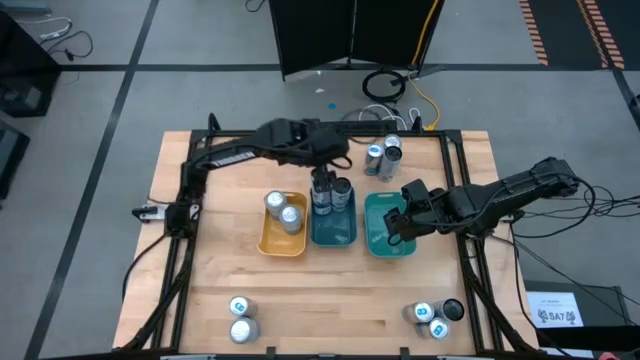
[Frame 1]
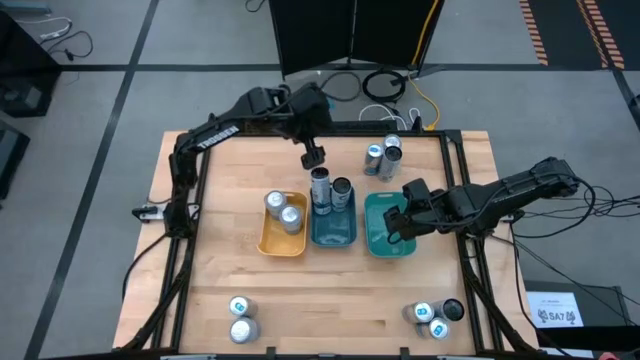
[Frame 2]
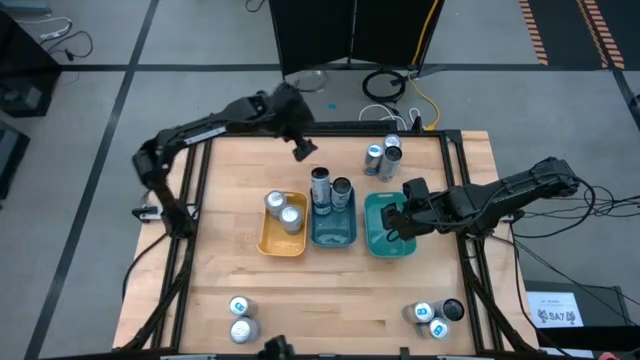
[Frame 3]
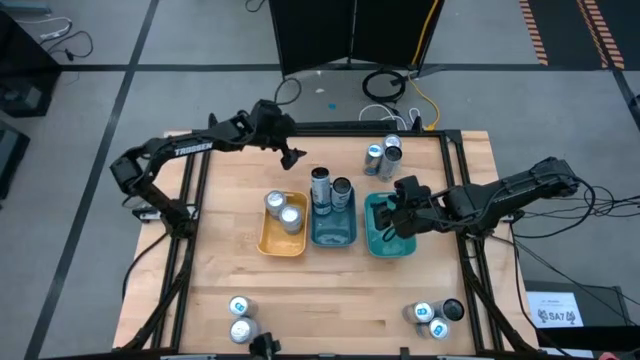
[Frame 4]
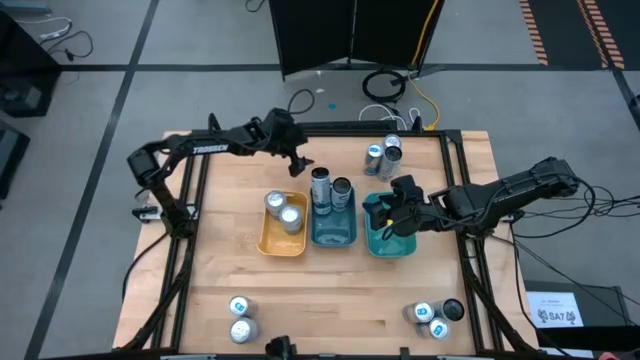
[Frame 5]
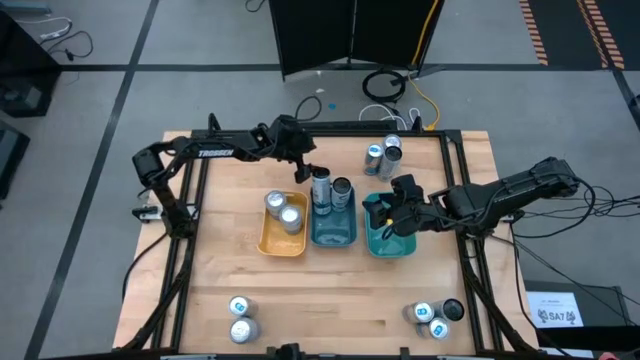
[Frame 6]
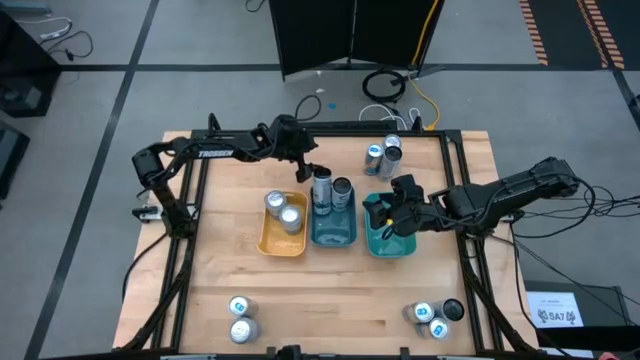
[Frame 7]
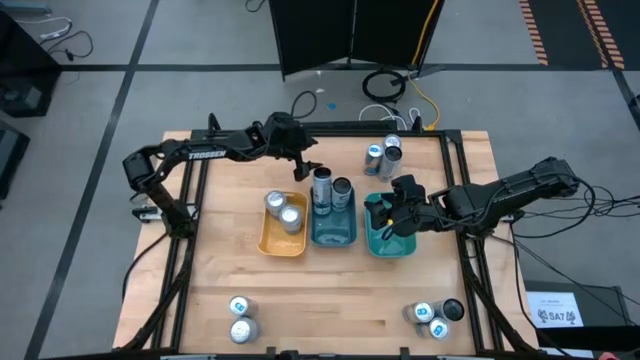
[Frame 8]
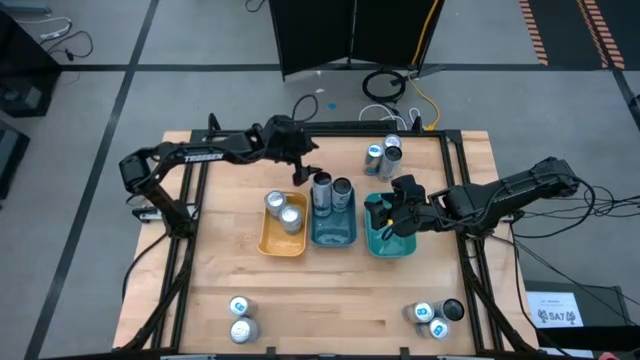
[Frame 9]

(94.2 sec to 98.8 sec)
Task: Sort soda cans
Adjust the white-blue soda can in the blue bin

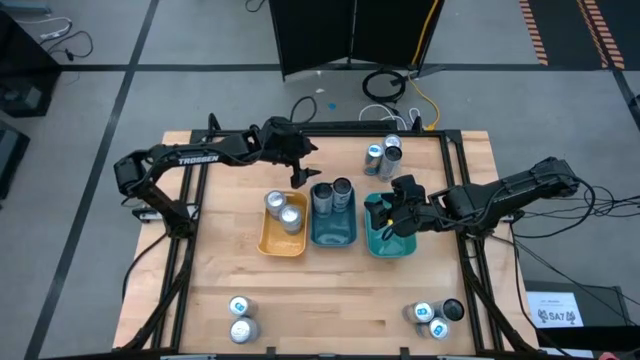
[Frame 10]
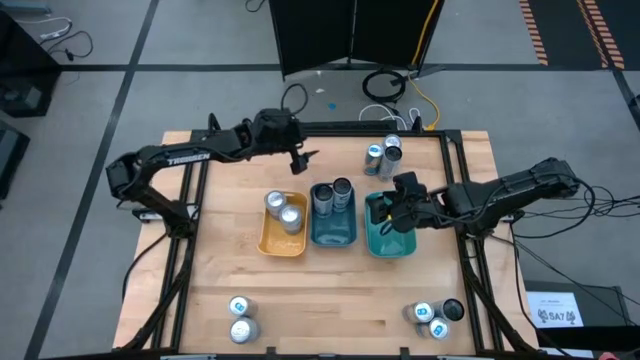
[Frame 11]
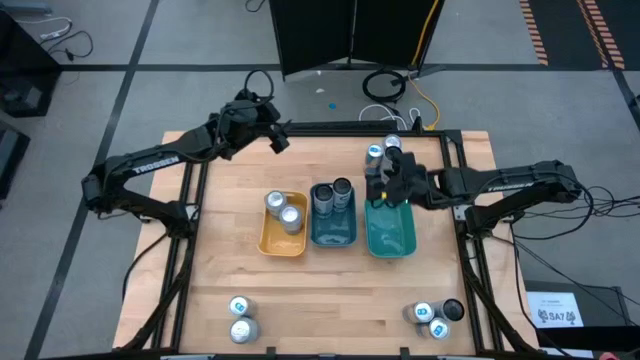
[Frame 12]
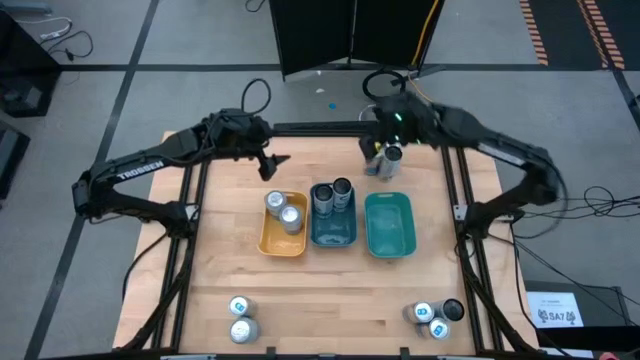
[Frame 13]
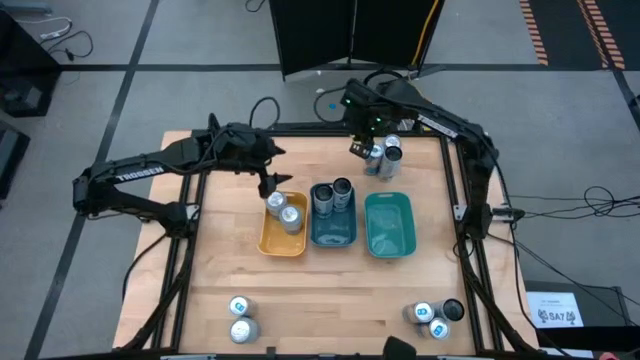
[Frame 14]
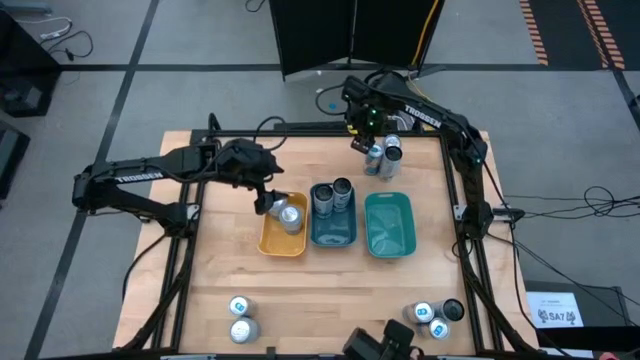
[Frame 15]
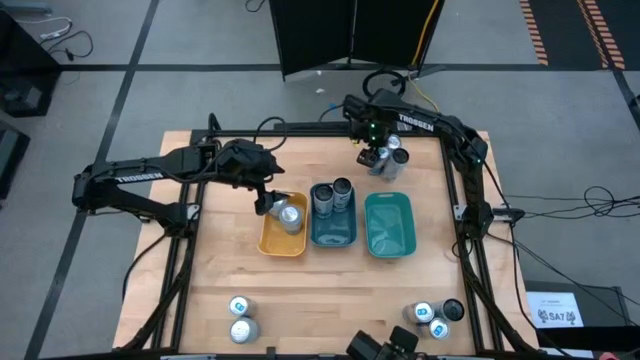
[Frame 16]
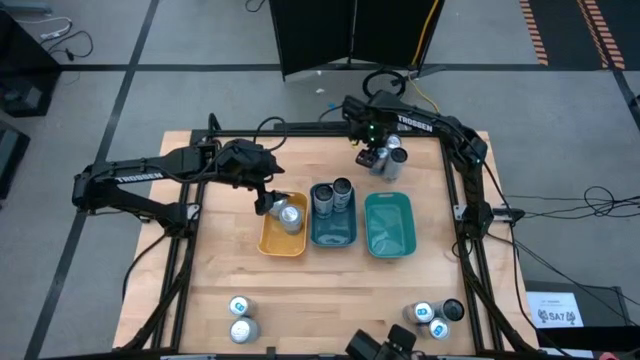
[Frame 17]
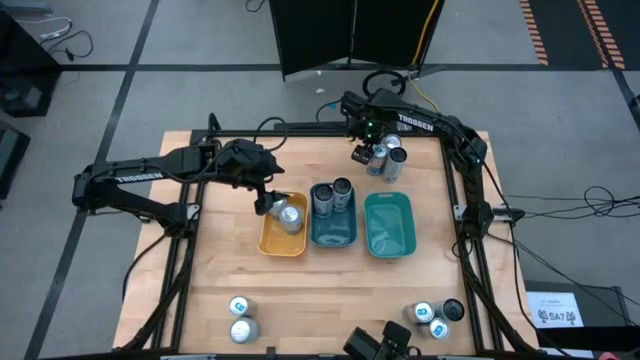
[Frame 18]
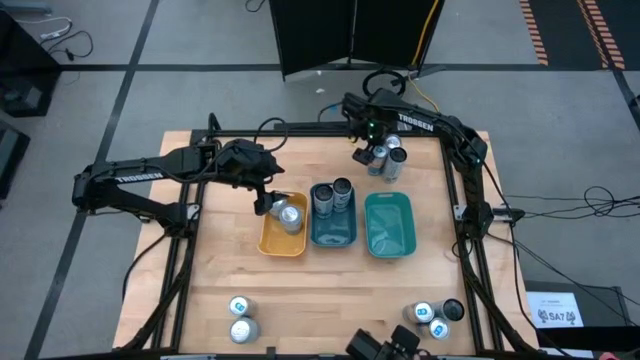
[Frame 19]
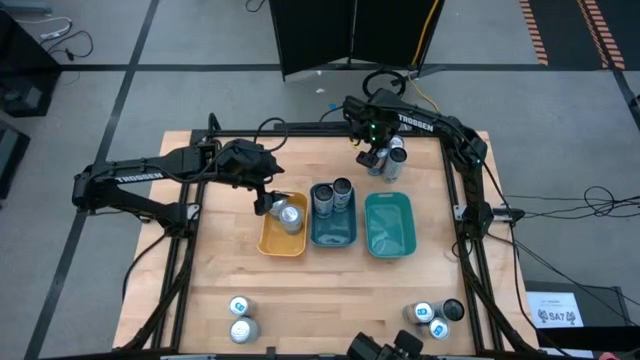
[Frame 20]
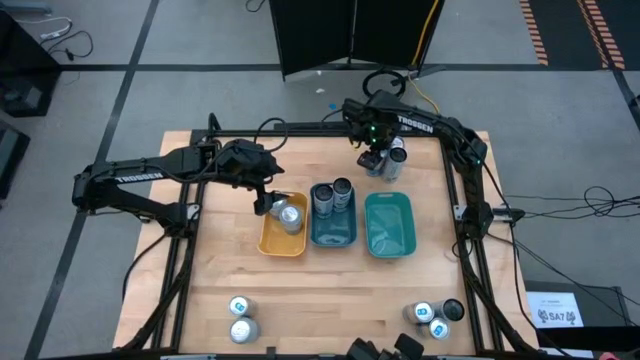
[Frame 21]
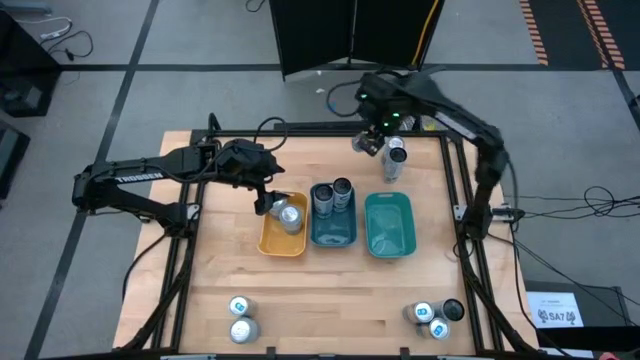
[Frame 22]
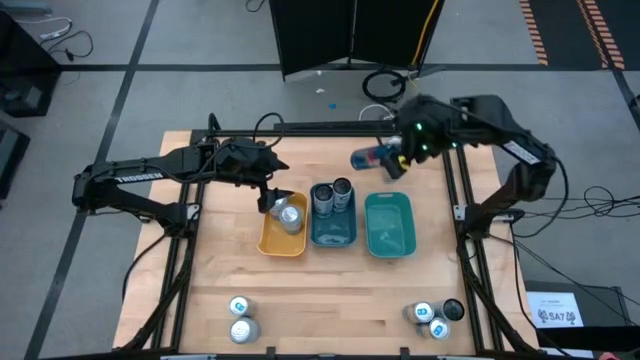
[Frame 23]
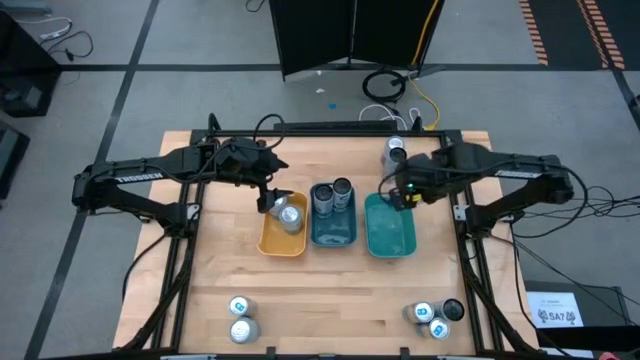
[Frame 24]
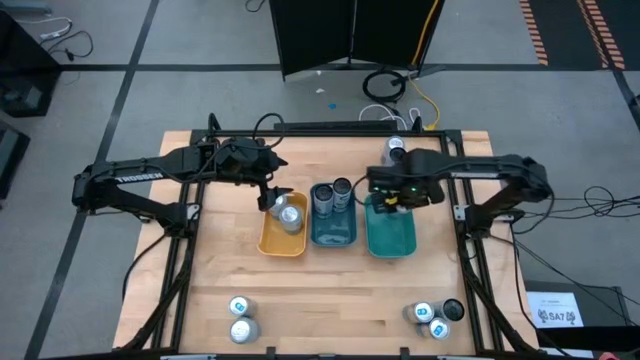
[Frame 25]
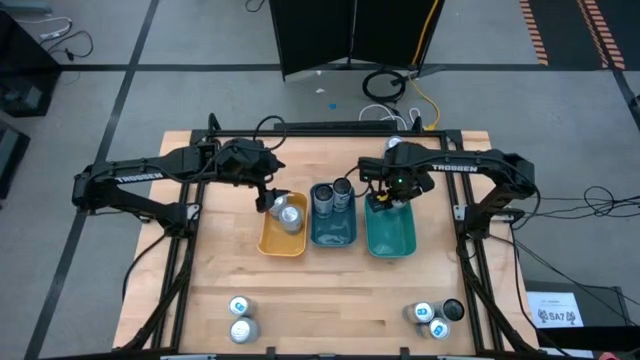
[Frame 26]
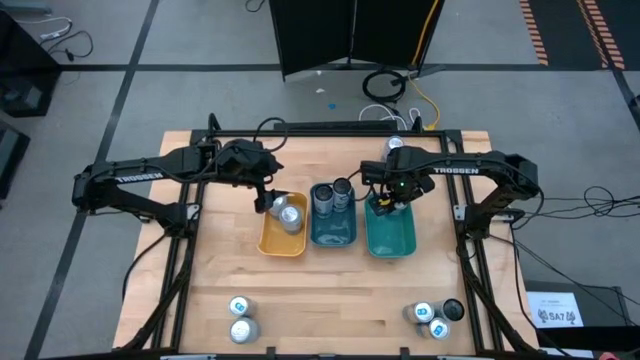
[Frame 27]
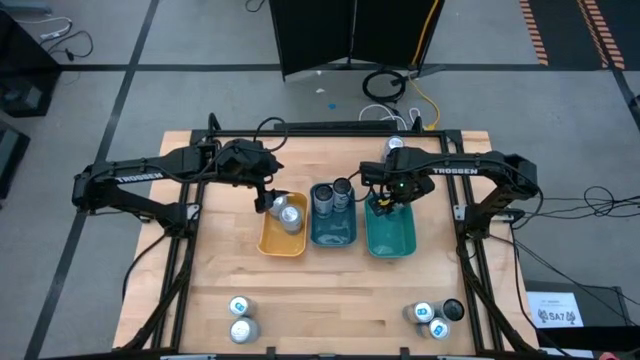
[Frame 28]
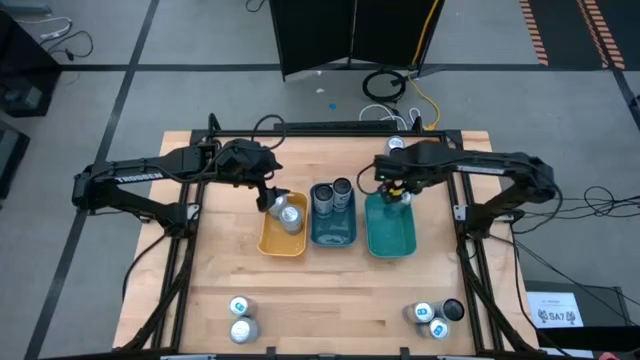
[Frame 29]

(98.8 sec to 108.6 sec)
Put the blue soda can into the green bin

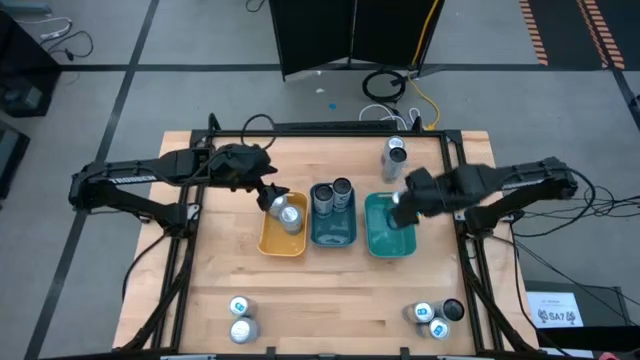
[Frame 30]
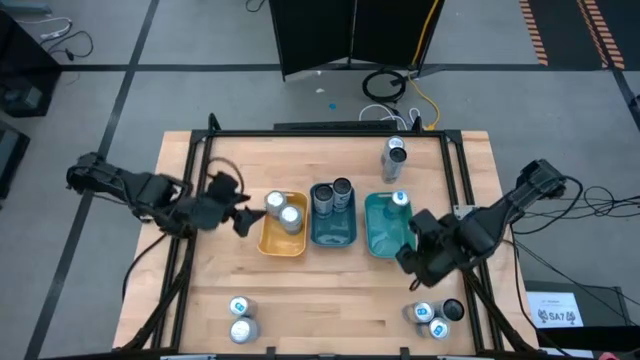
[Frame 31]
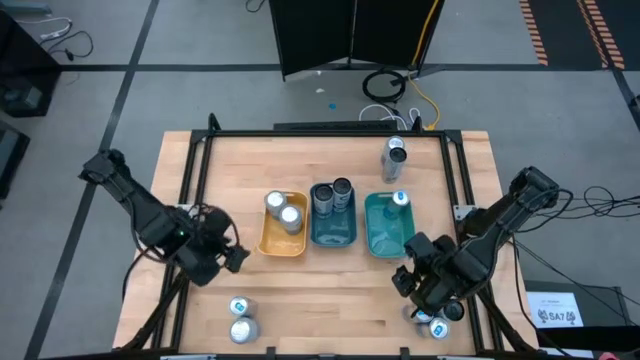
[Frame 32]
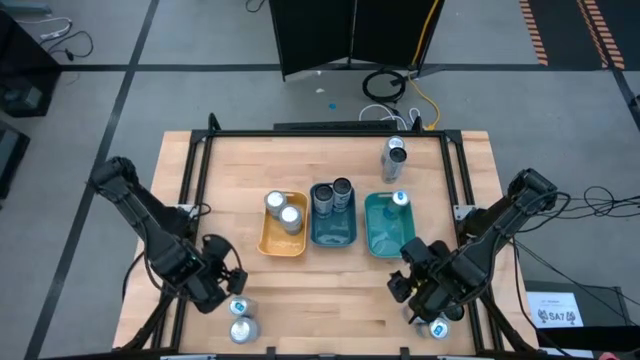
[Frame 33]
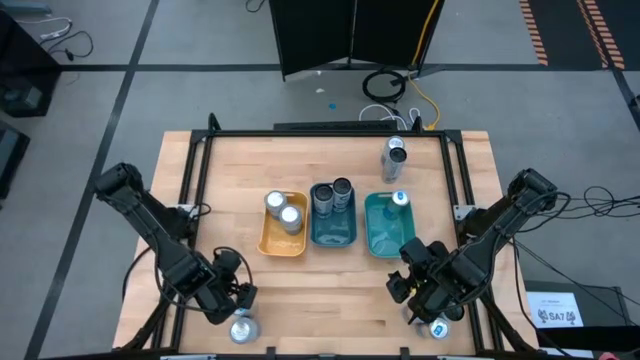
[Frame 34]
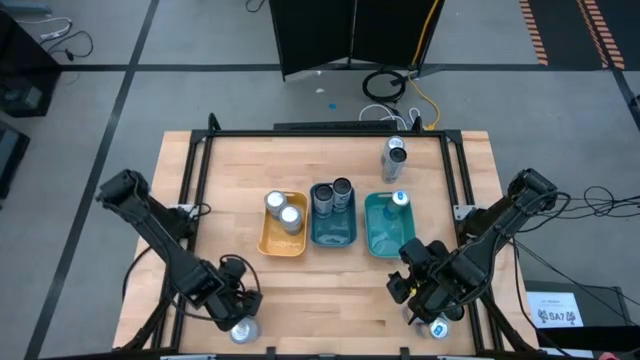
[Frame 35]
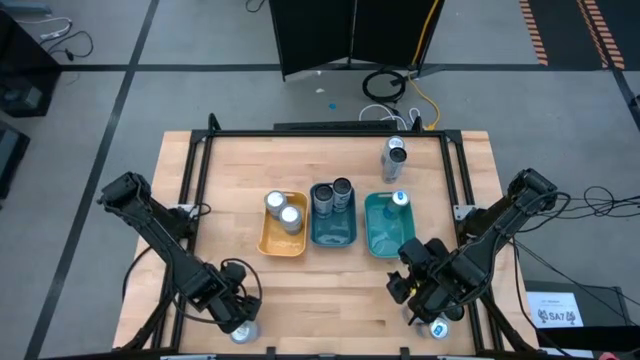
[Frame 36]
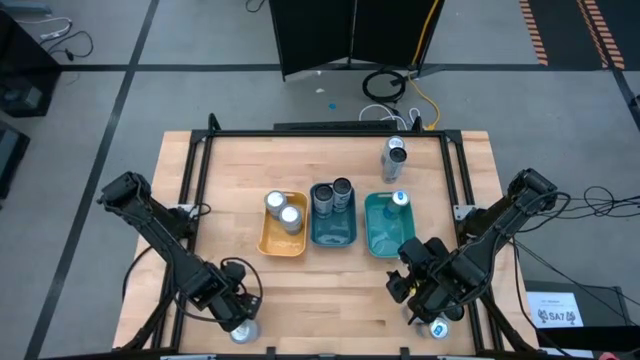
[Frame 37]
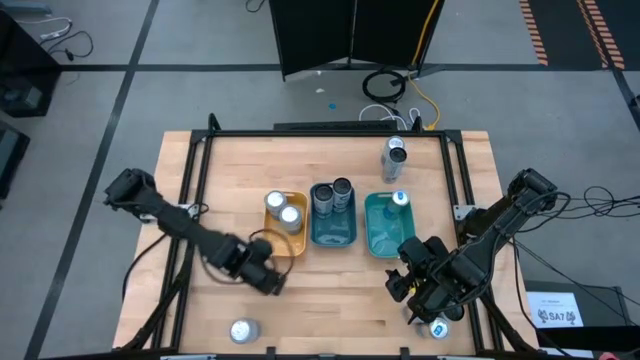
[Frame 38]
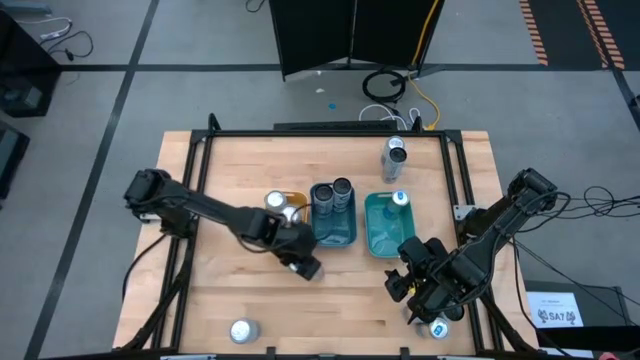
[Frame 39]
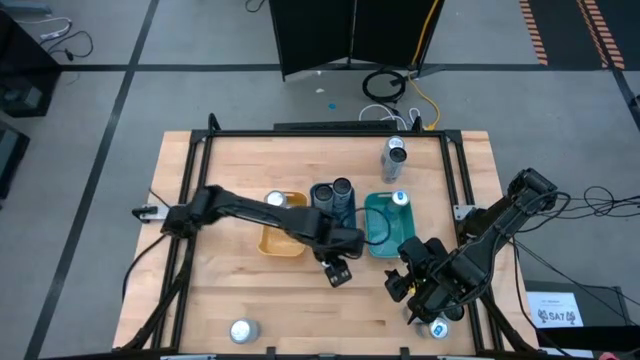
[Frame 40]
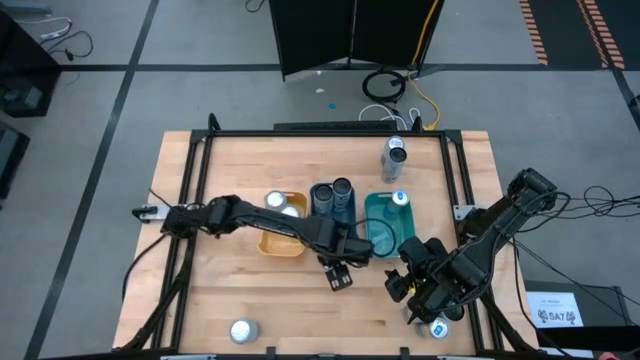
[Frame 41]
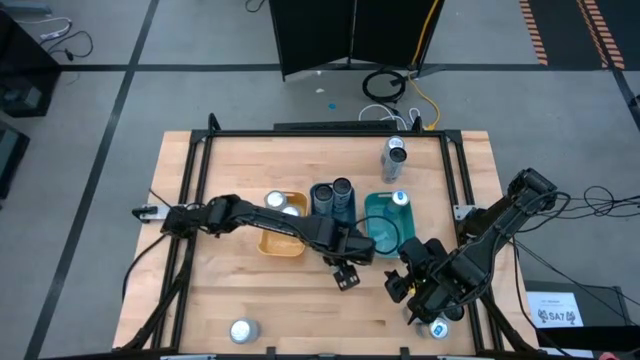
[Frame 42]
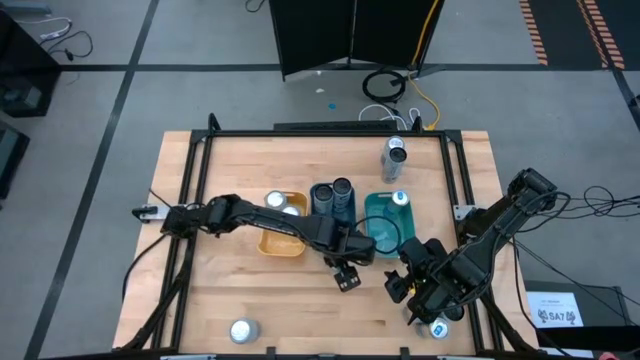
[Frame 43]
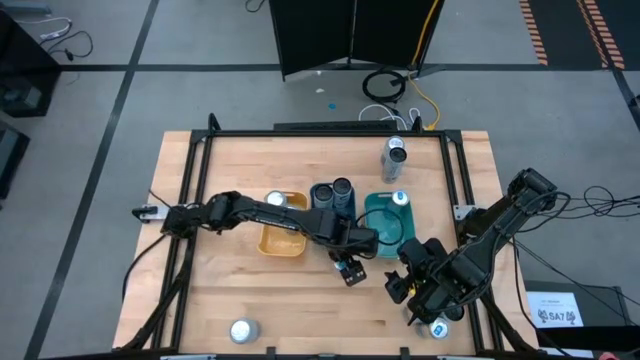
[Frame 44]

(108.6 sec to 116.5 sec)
Move the blue soda can into the center of the table
